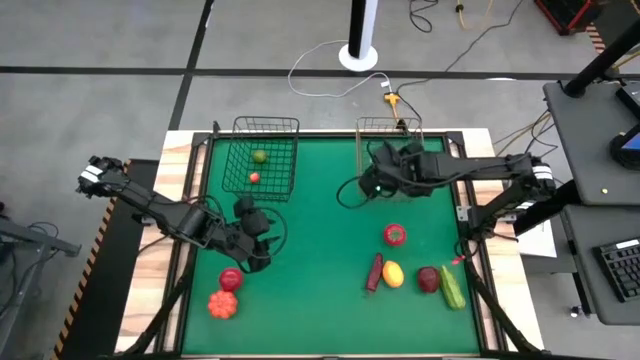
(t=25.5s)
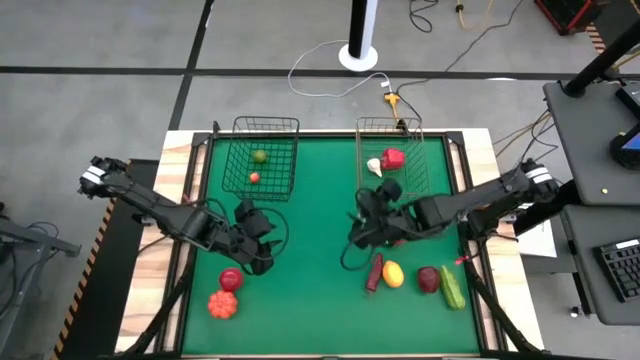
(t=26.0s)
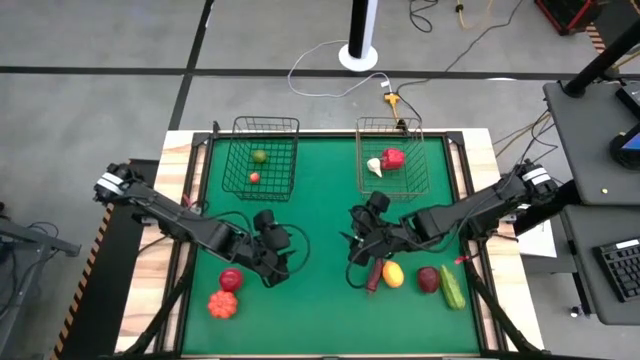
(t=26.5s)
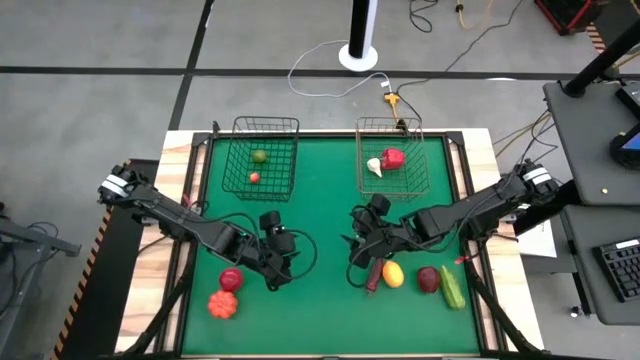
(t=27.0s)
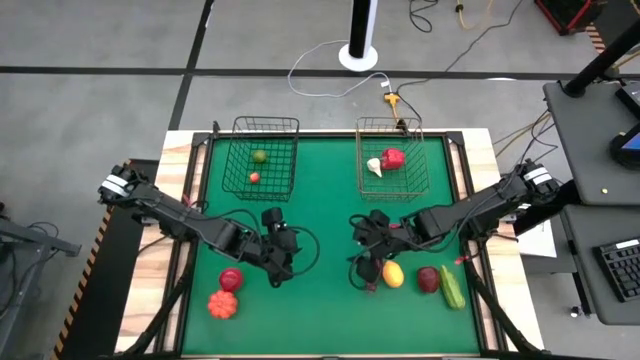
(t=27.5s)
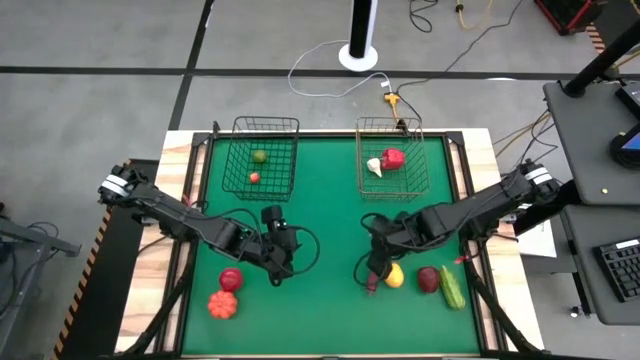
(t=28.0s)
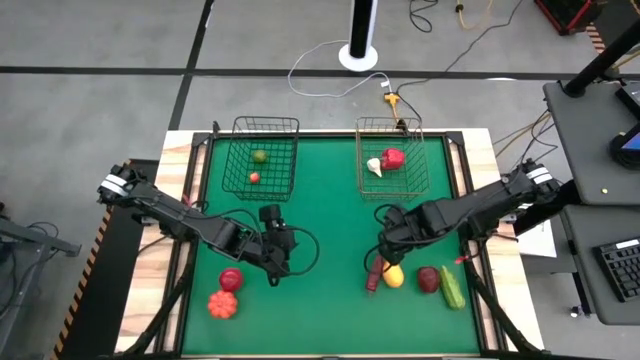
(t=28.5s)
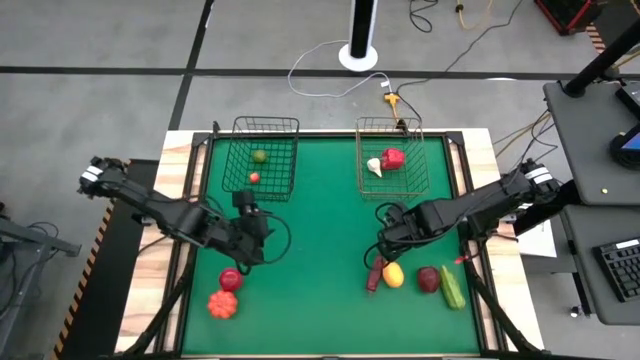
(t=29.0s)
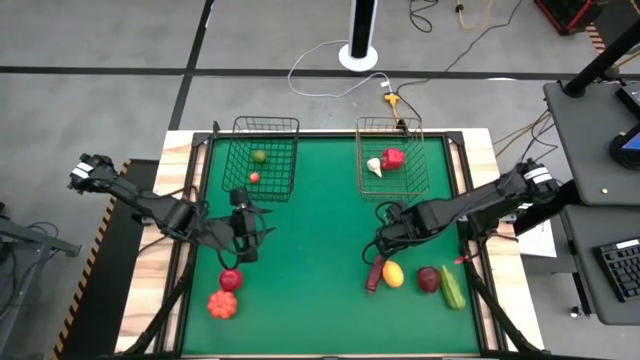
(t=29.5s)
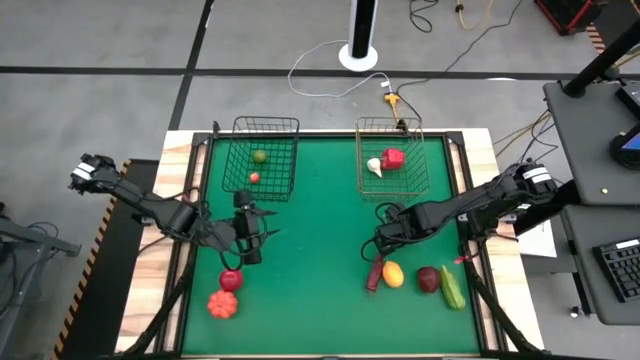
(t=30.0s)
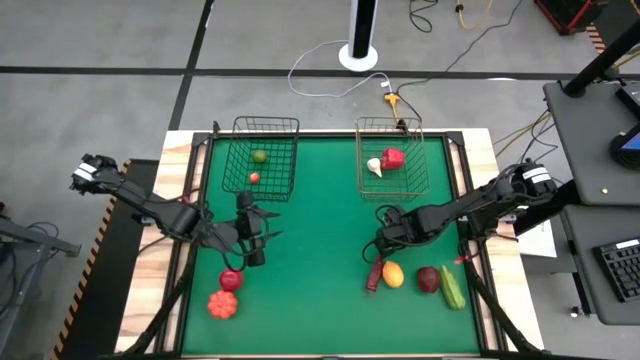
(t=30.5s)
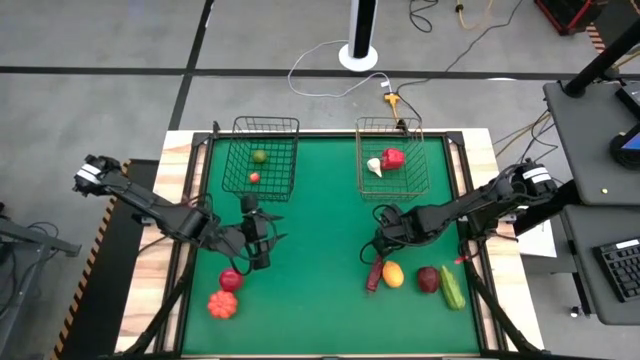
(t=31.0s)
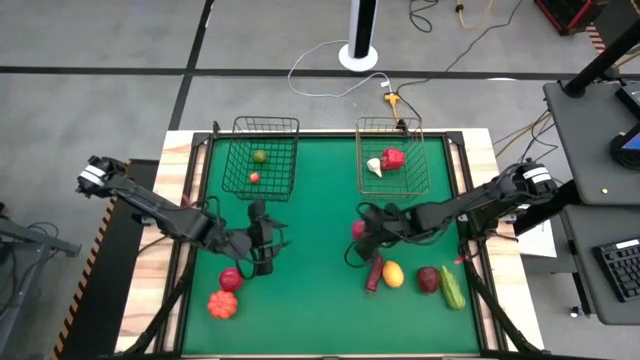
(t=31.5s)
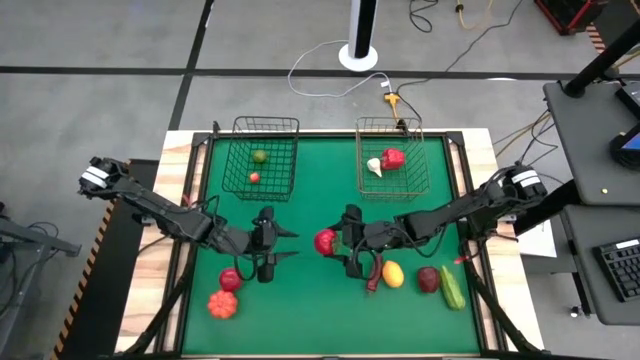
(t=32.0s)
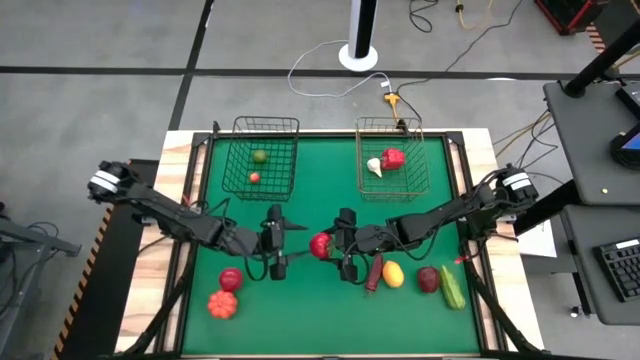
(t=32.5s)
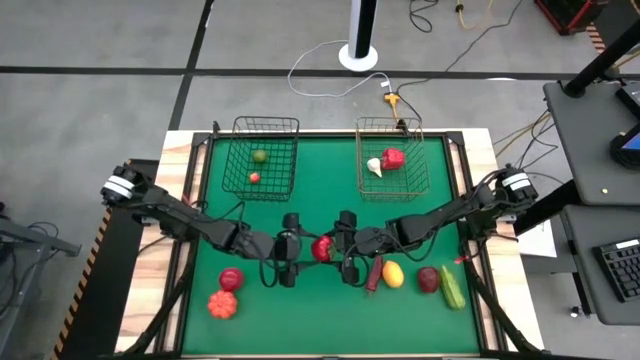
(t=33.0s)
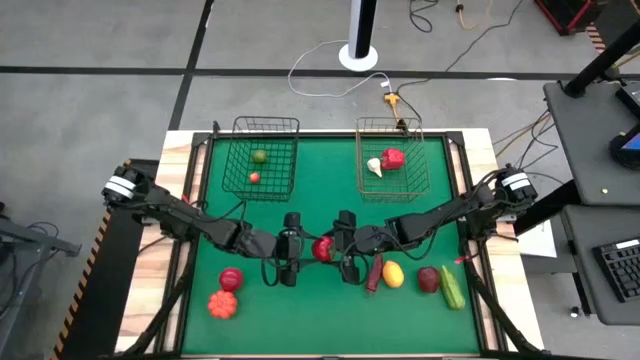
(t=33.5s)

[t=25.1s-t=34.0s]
Task: Sort produce into baskets
Put the right tomato into the black wire basket

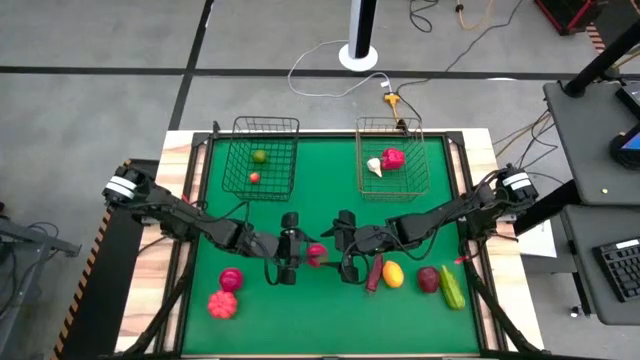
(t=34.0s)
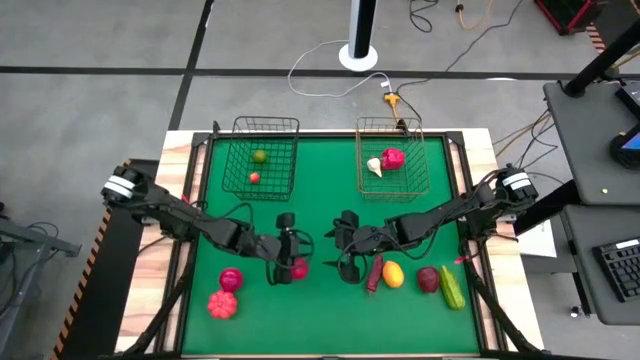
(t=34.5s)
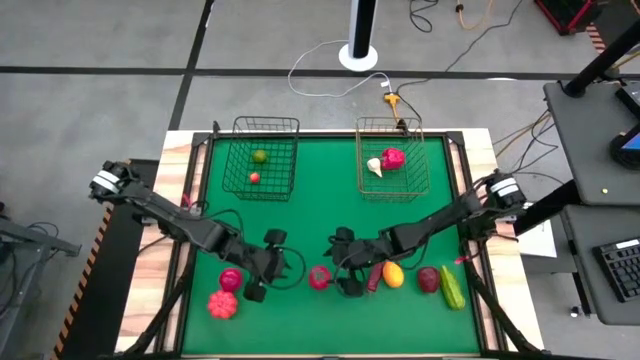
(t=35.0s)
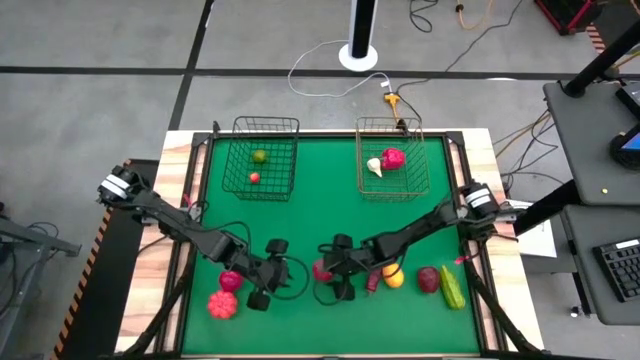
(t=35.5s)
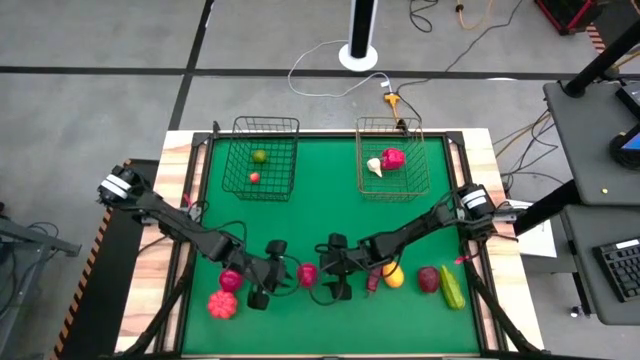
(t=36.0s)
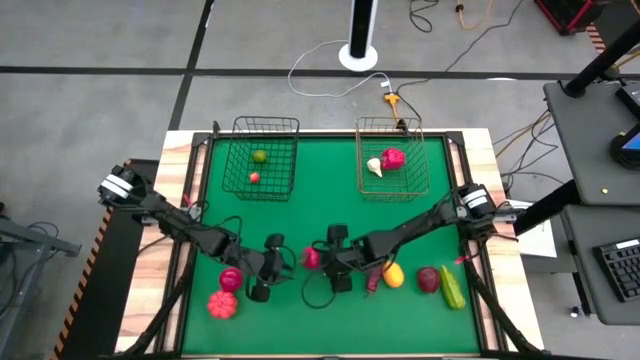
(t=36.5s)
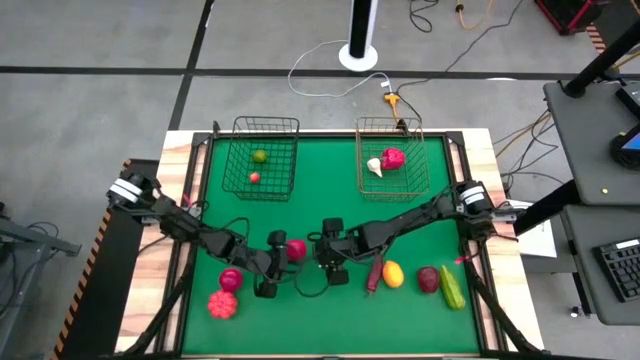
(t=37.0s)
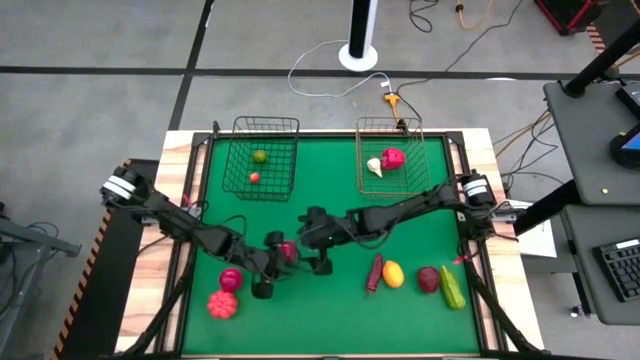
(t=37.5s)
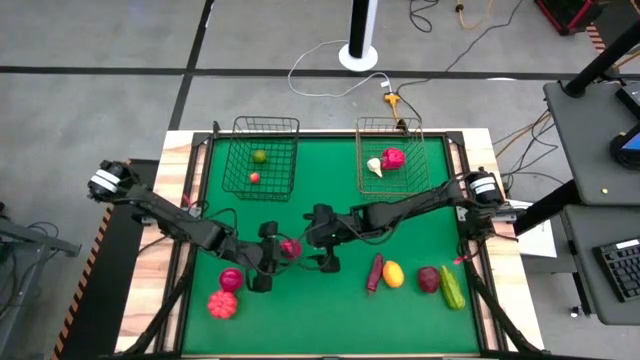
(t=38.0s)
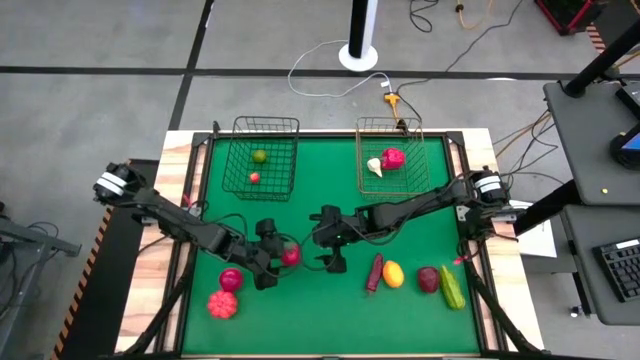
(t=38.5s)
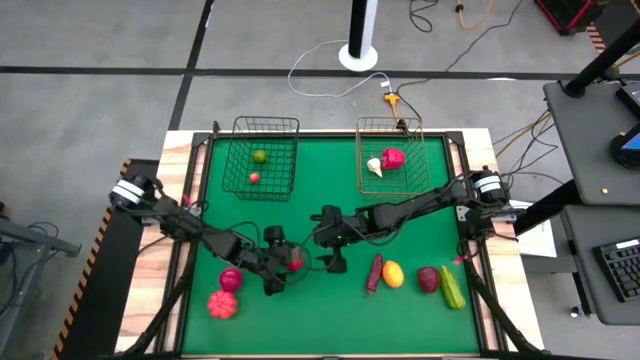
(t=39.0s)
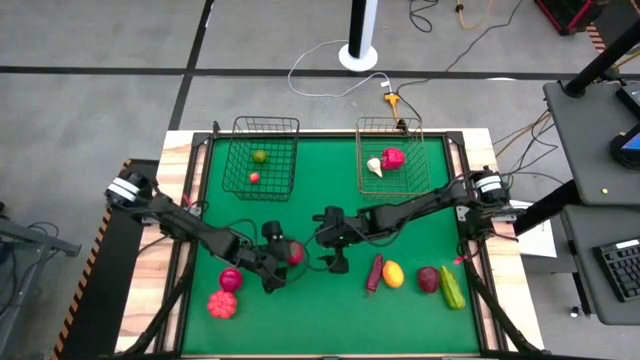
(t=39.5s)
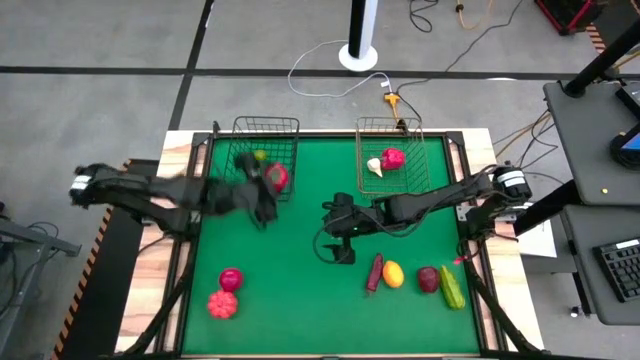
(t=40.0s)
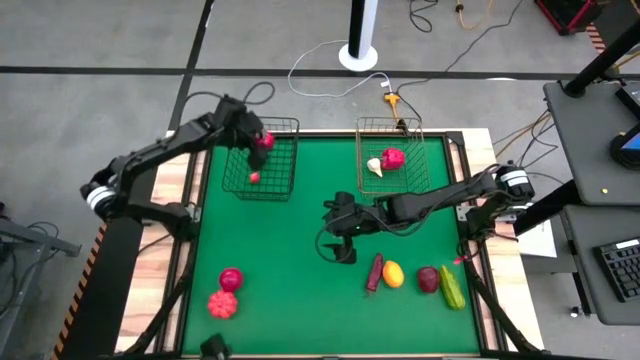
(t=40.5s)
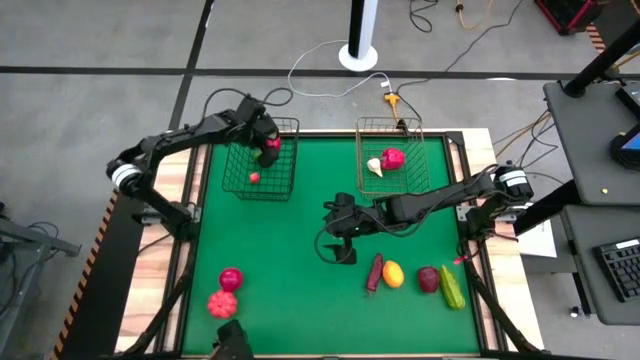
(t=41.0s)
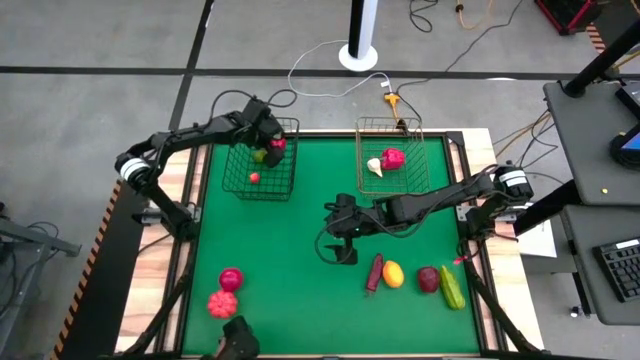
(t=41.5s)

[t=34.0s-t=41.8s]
Put the right tomato into the black wire basket

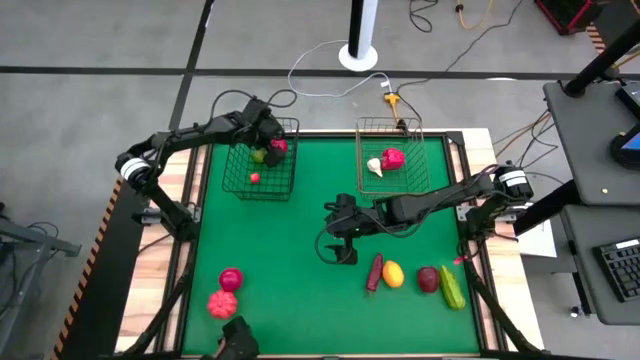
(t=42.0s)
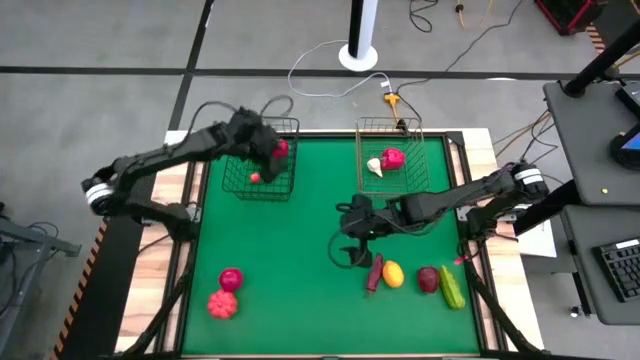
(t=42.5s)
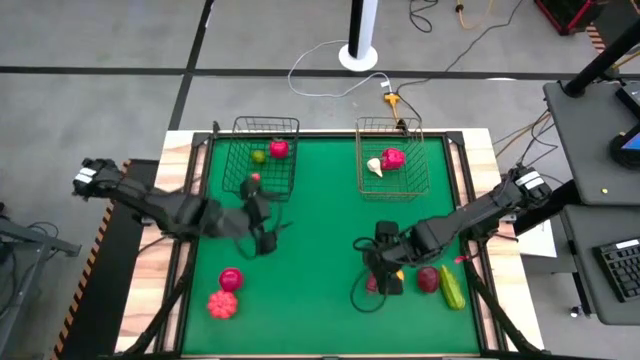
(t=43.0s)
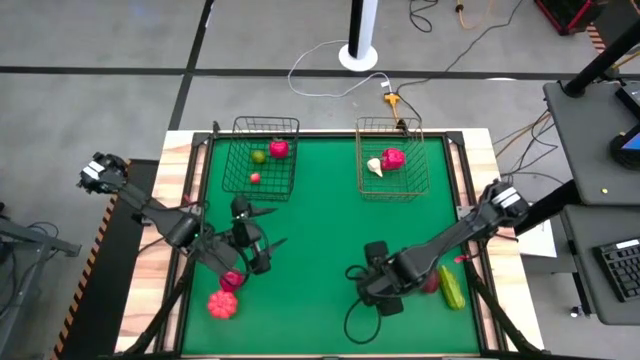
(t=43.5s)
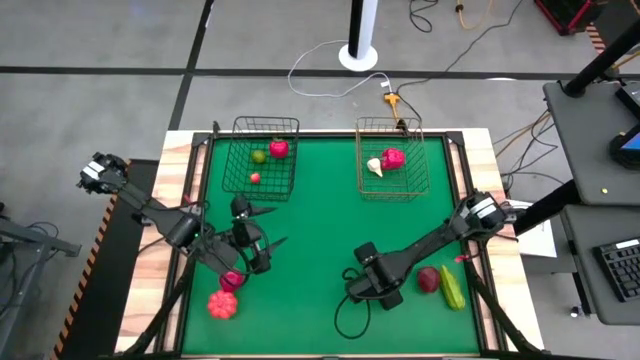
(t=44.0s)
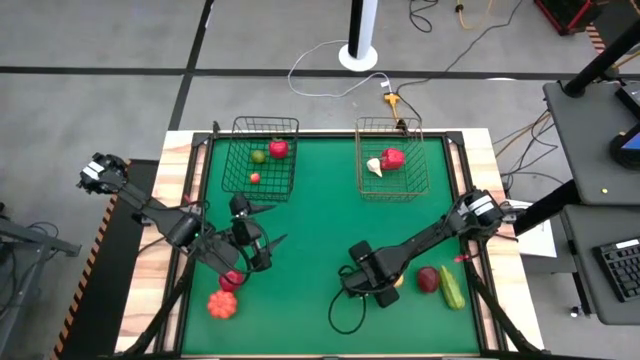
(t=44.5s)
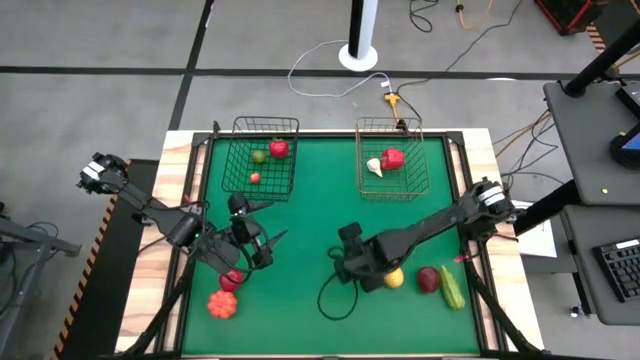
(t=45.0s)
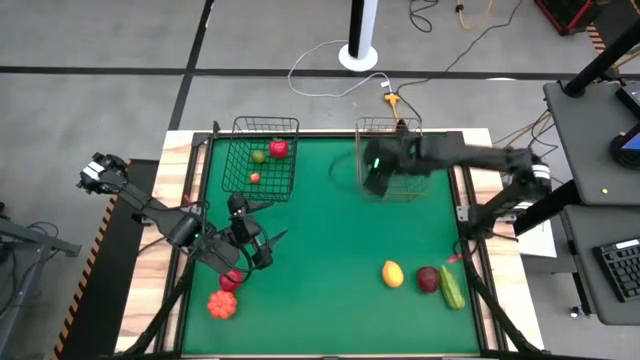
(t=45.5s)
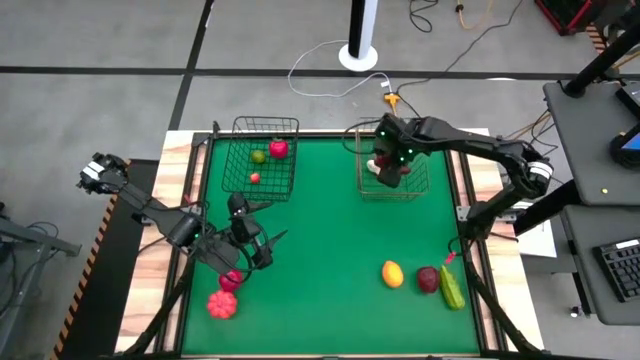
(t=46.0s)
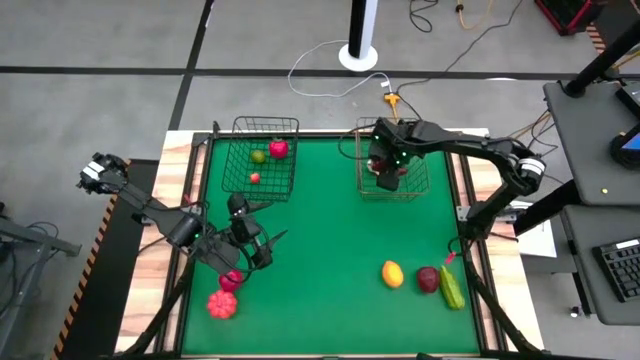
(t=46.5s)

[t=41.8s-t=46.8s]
Put the chili pepper into the gold wire basket
